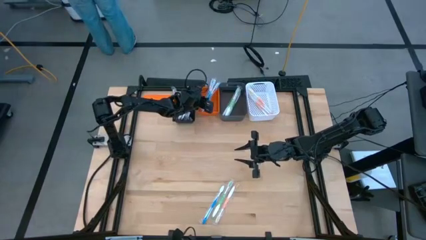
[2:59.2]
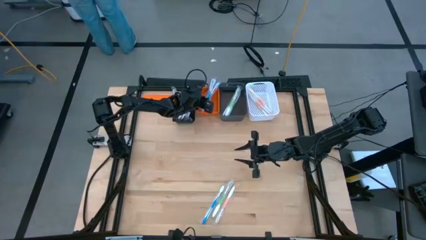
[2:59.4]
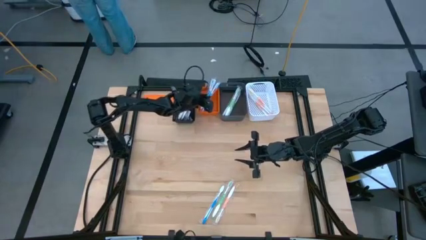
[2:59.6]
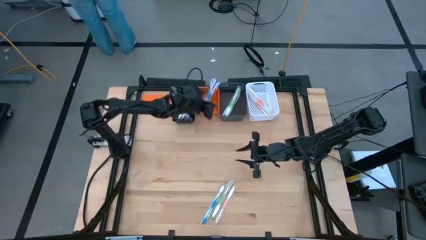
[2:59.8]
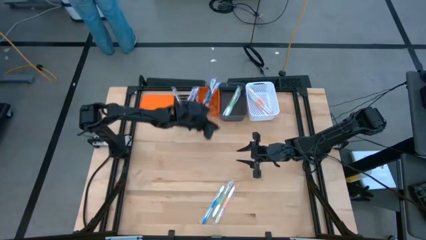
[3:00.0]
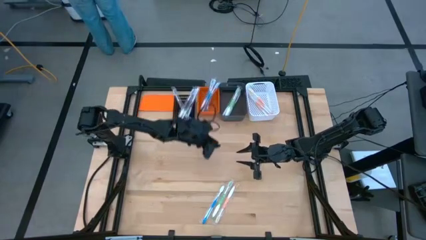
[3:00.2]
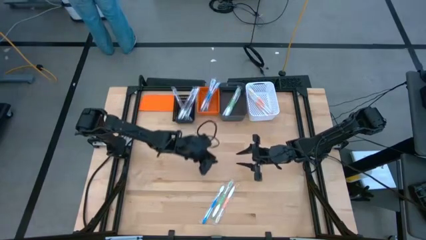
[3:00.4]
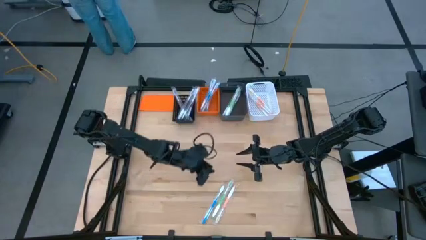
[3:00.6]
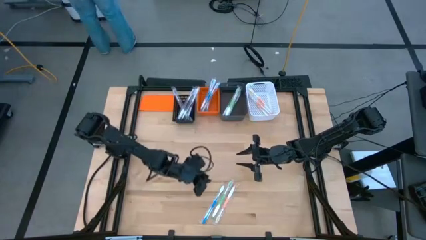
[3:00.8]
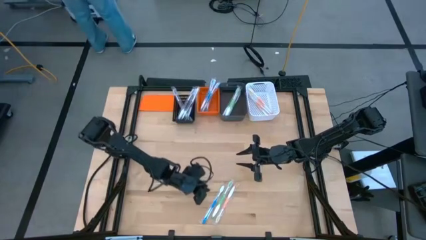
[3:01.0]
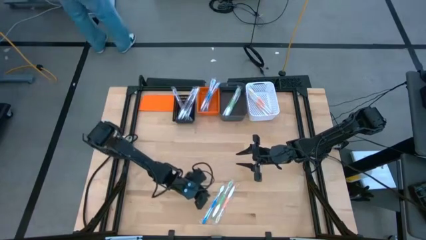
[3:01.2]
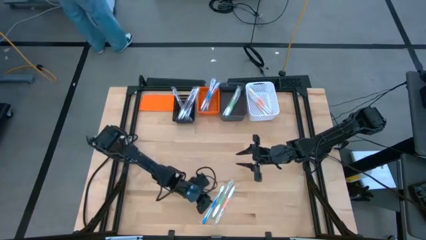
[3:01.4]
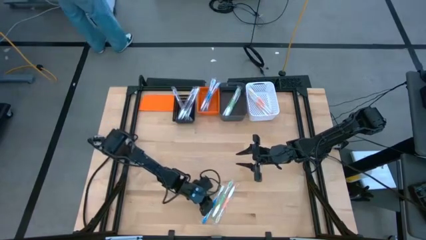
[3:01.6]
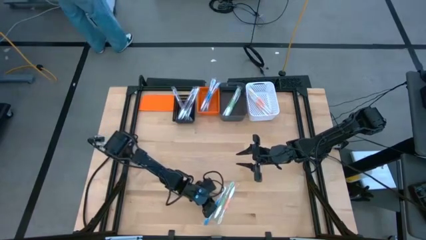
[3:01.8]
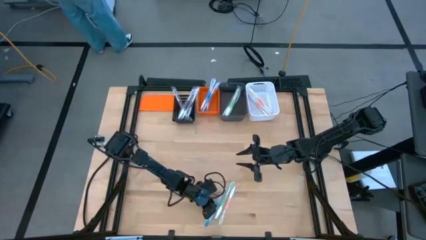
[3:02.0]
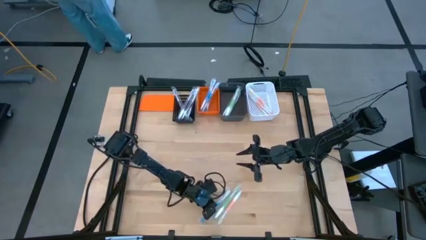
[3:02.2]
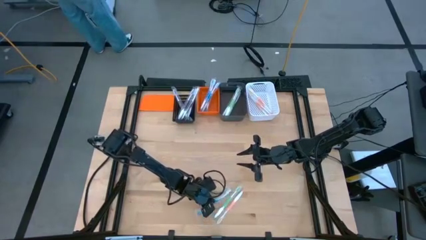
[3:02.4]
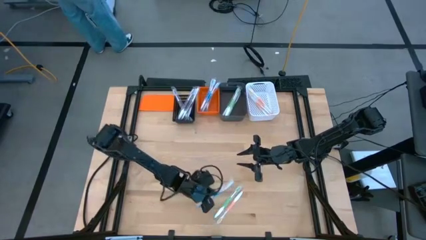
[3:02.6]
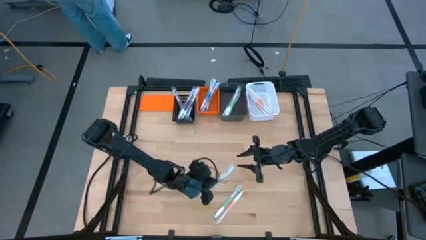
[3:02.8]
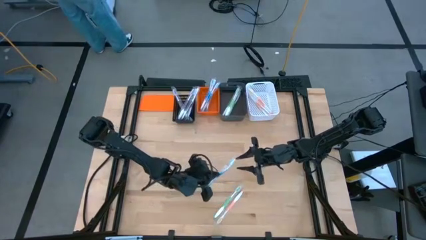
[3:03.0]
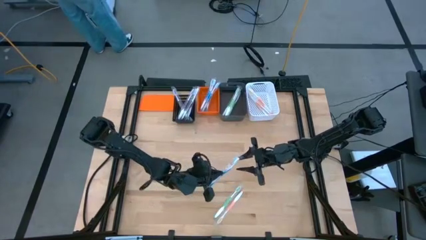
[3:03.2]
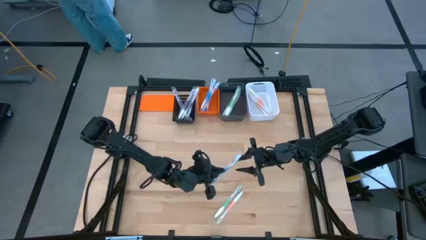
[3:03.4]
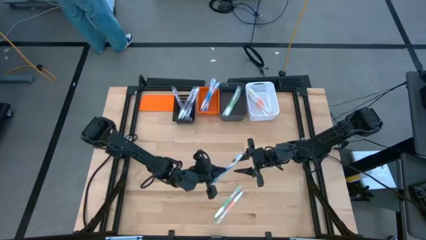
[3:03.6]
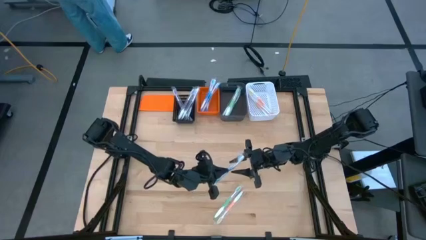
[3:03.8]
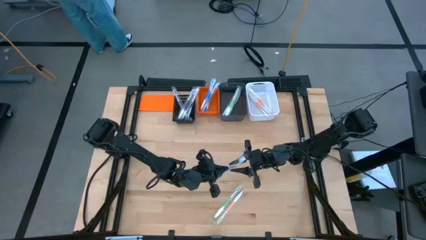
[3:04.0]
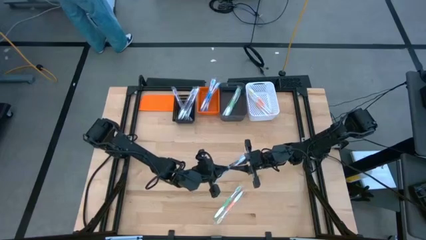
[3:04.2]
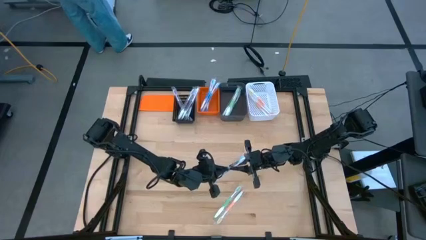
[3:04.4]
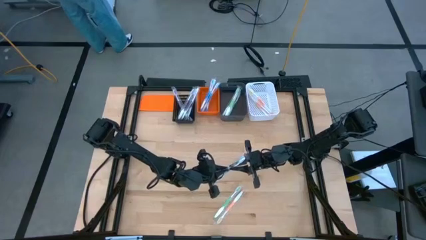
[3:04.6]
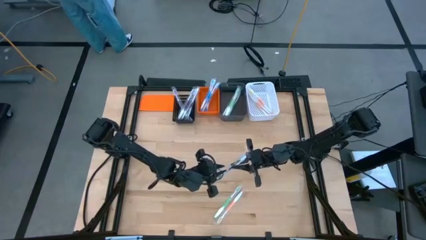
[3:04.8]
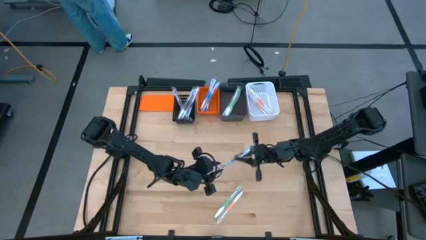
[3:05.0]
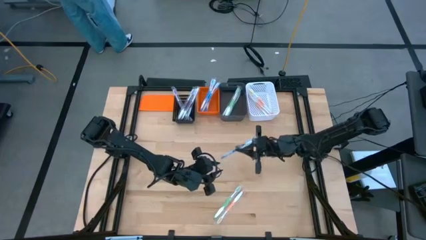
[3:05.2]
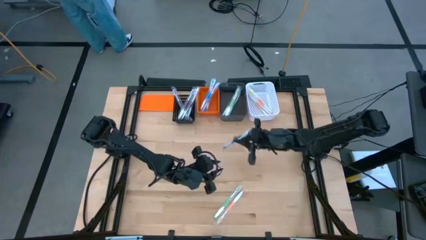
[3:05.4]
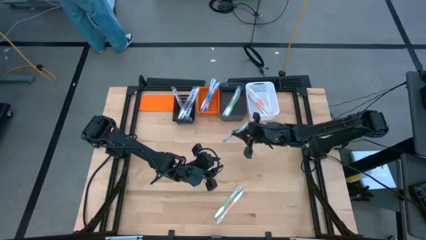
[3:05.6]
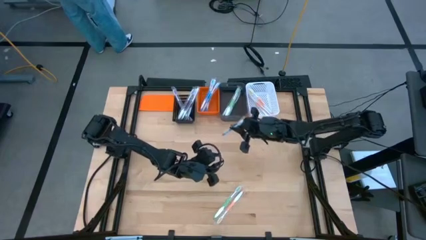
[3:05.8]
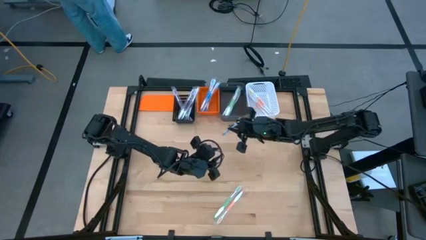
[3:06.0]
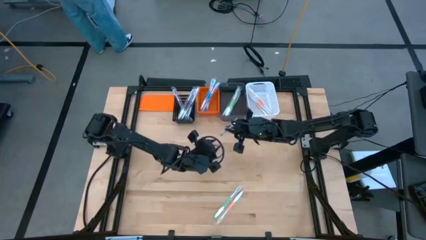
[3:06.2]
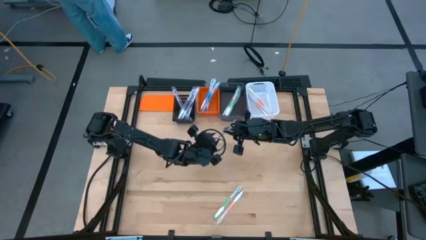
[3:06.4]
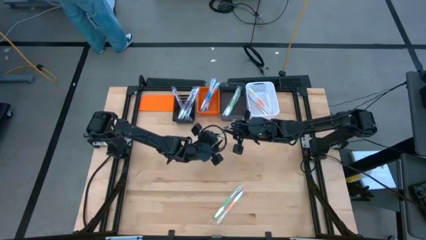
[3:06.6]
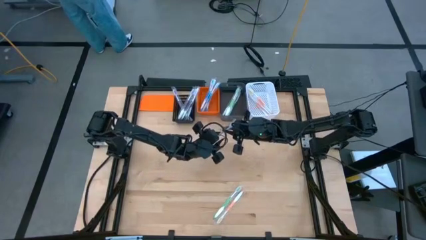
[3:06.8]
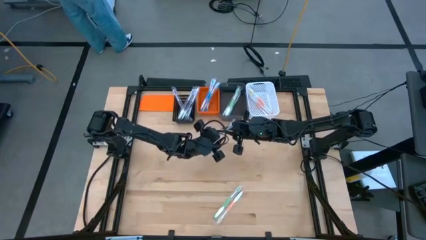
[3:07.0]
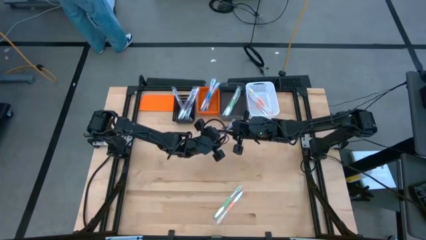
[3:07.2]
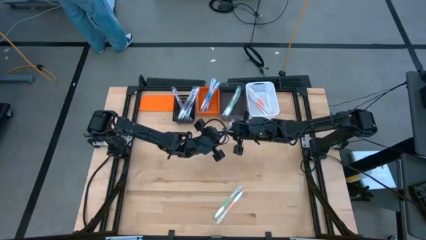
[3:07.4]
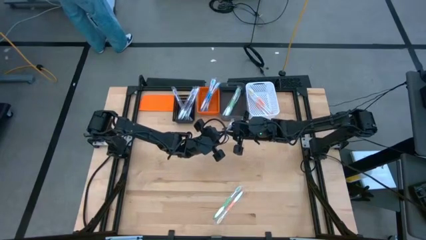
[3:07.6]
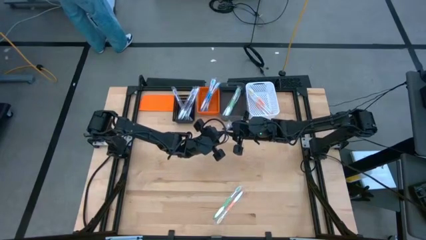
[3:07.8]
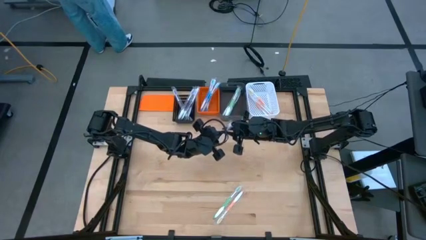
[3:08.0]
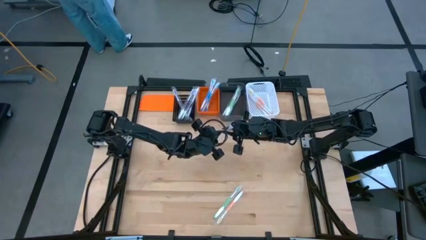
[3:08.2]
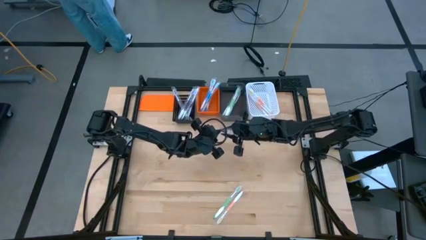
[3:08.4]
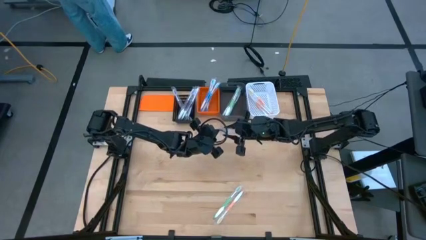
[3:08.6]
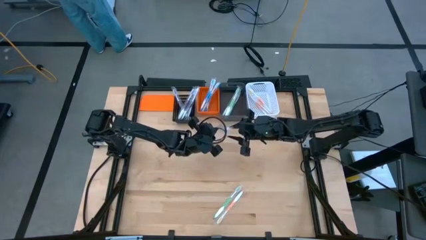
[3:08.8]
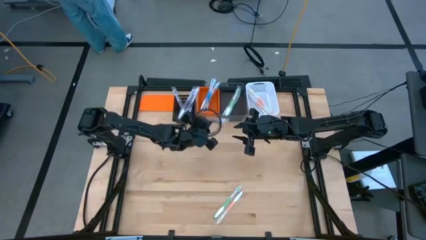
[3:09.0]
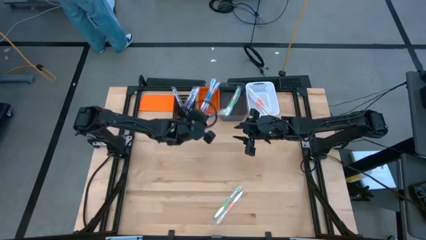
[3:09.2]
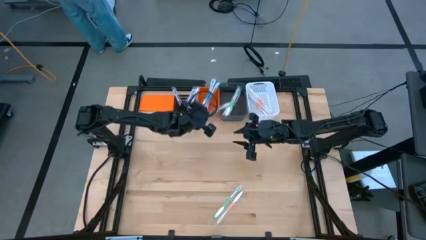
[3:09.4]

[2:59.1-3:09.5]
Task: Pick & Place Toothbrushes
Put the blue toothbrush into the orange basket

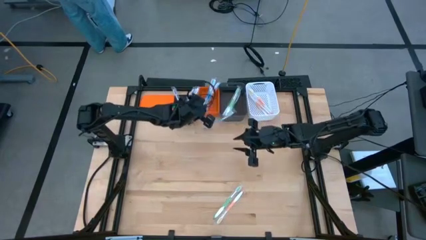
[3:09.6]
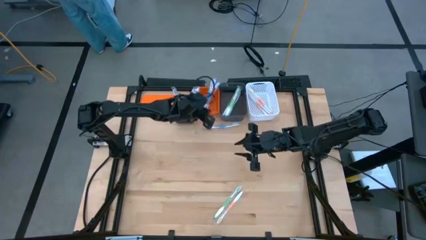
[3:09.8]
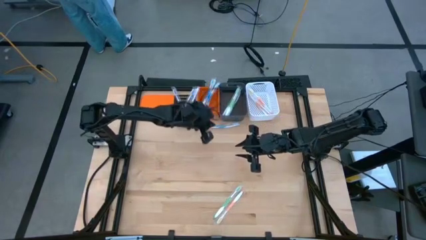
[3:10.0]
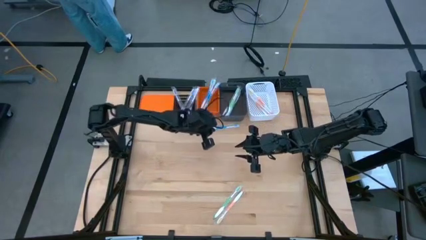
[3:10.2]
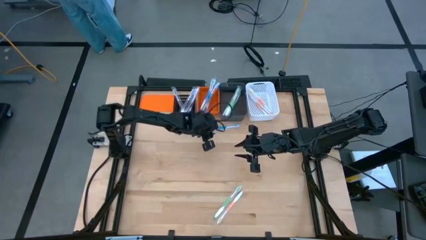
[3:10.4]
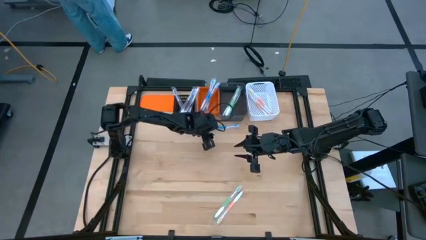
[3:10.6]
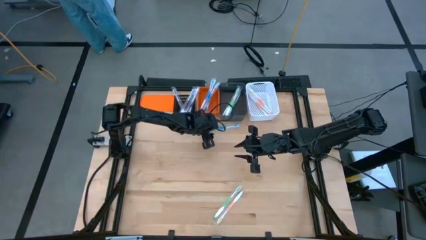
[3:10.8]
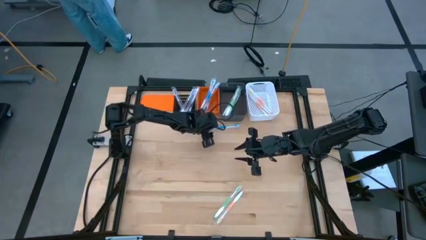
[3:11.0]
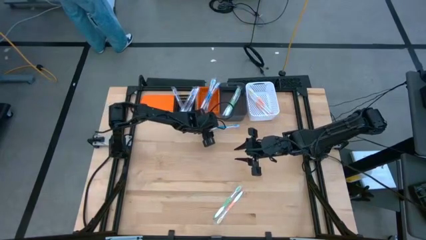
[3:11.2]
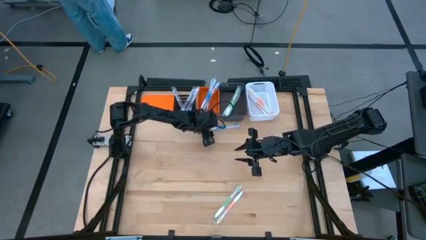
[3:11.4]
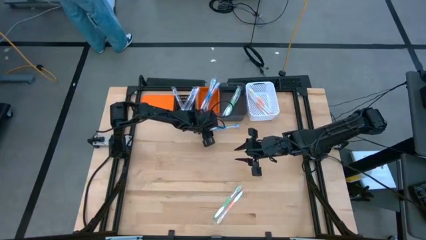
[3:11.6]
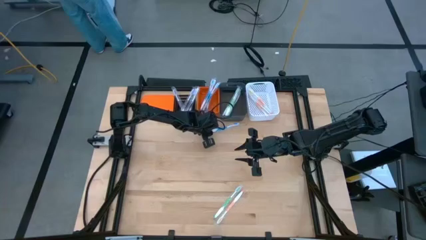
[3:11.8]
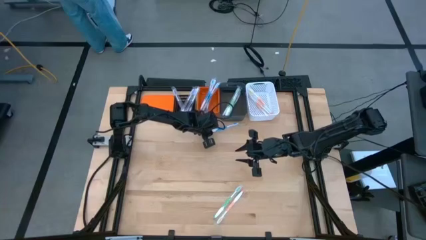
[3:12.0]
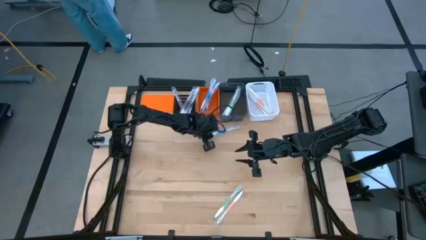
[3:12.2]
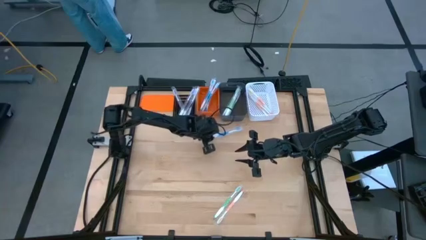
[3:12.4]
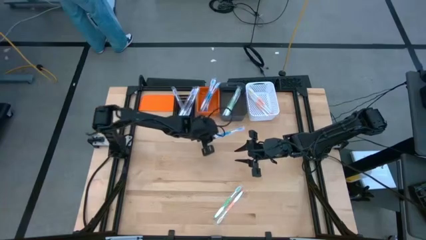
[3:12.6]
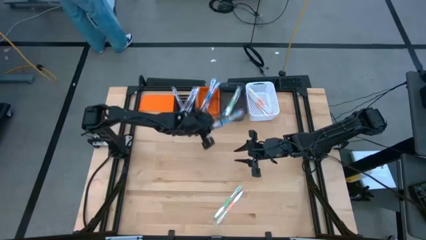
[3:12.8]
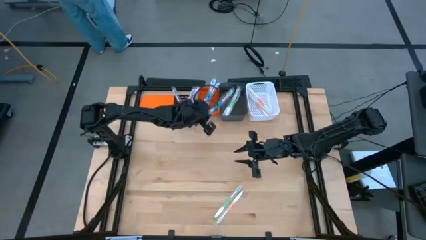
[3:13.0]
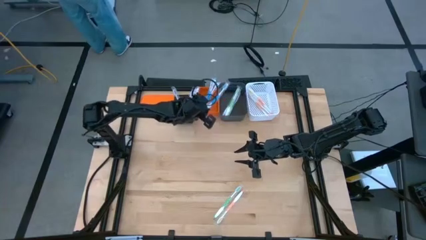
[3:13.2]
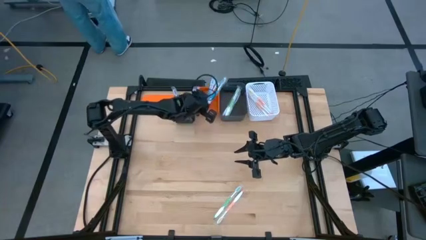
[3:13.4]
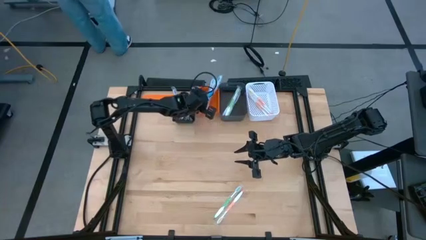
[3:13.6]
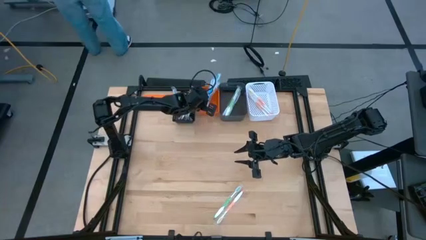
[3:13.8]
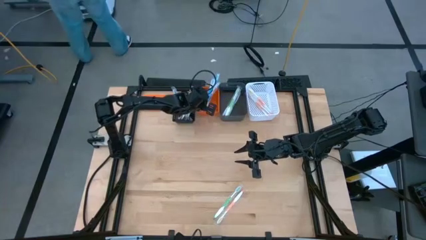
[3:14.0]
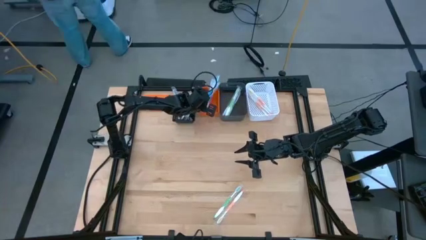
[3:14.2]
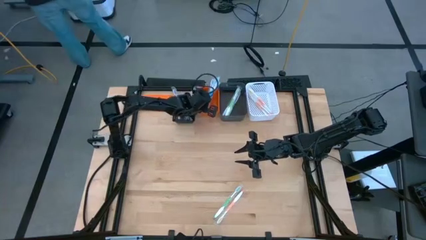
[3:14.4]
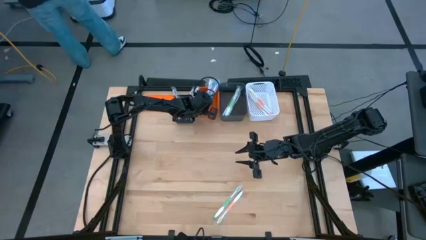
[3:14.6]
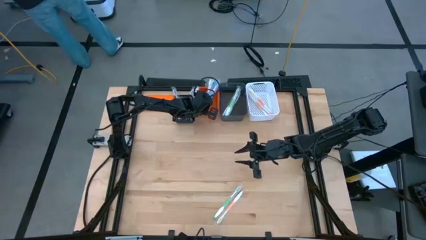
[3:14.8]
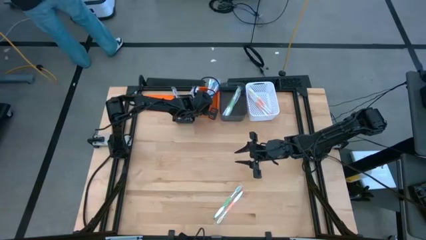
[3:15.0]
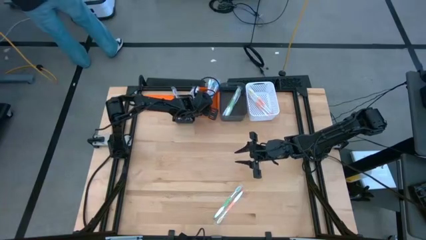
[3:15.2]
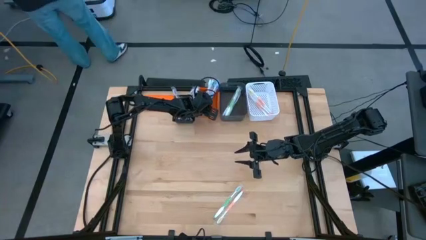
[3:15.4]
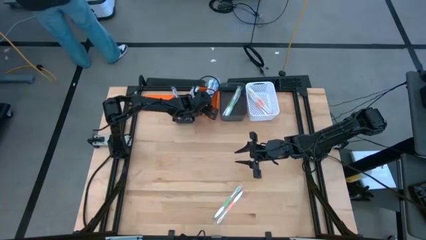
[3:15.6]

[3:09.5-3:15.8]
Put the blue toothbrush into the orange basket

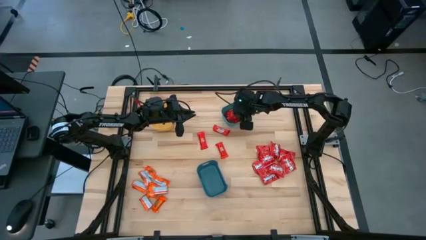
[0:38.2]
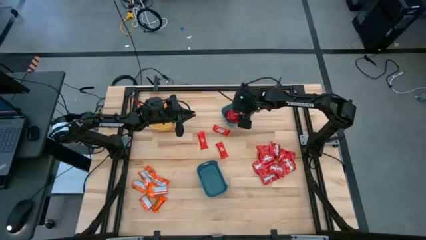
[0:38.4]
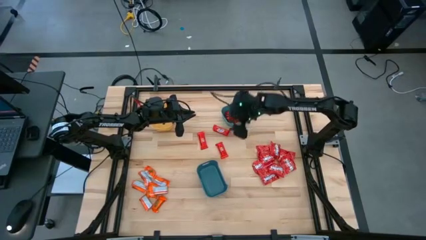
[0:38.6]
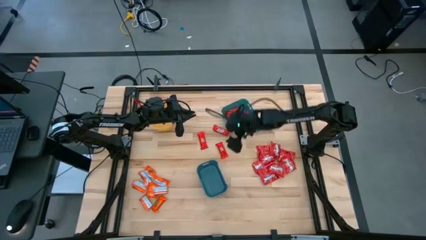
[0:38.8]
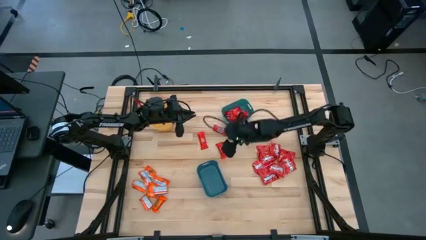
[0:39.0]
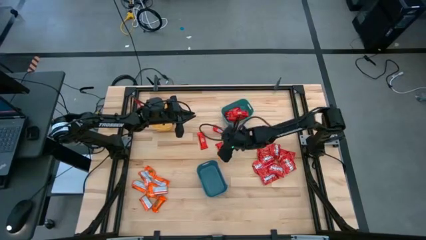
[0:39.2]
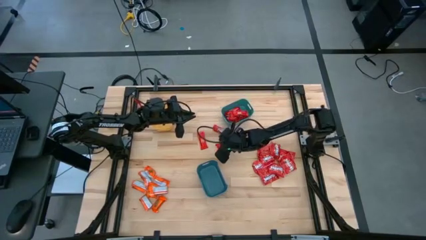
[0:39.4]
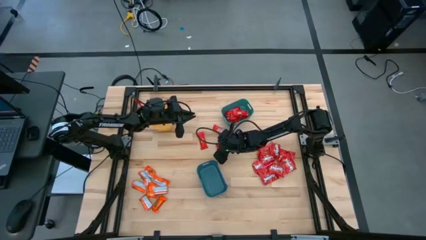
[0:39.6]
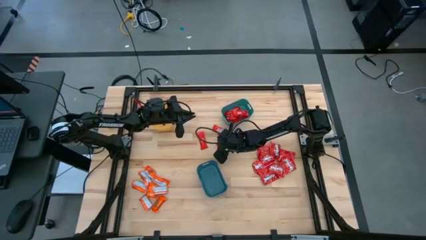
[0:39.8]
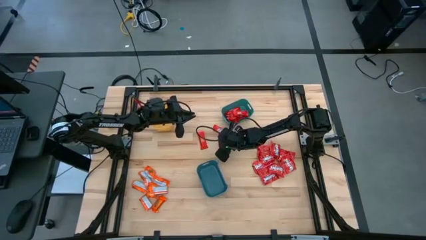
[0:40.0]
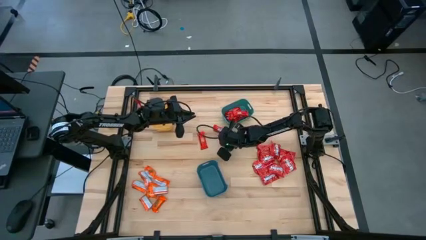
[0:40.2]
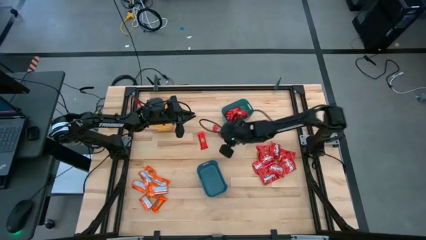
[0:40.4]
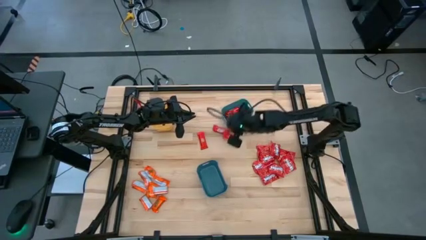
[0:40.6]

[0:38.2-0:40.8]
Task: Sort candy
Put the red chocolate bar into the green bin
